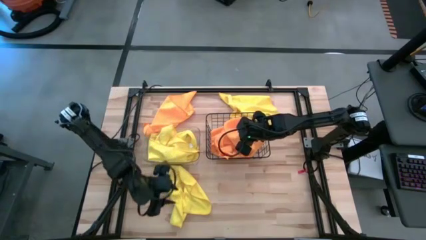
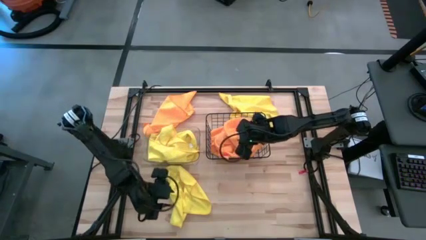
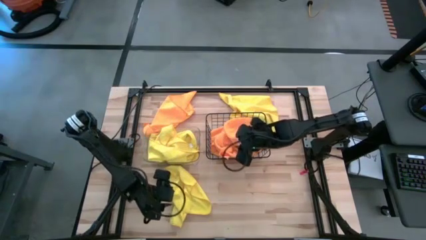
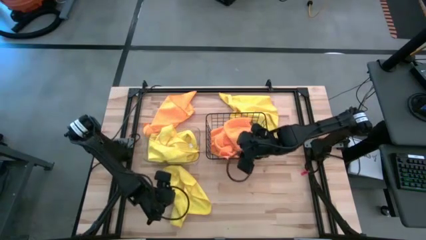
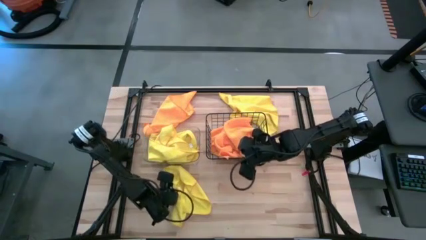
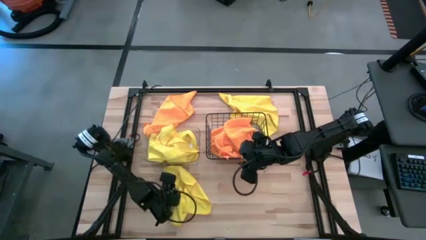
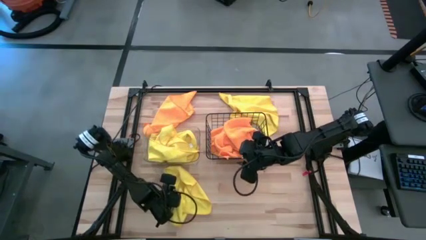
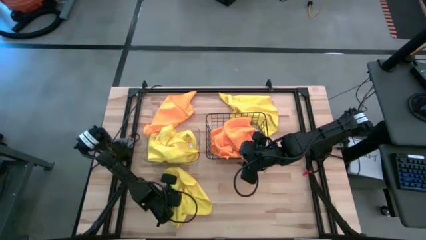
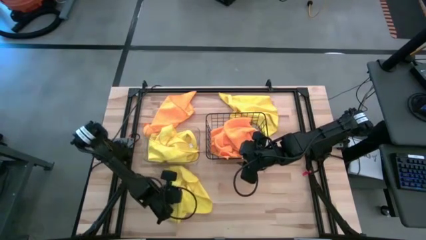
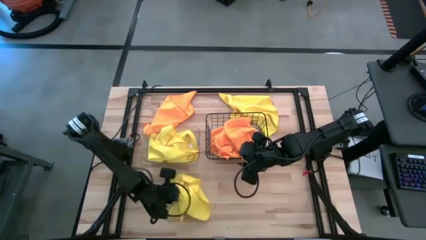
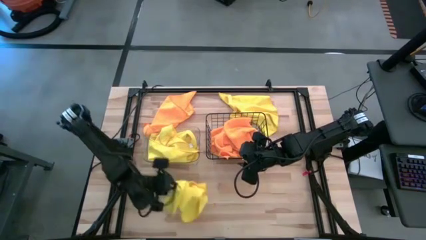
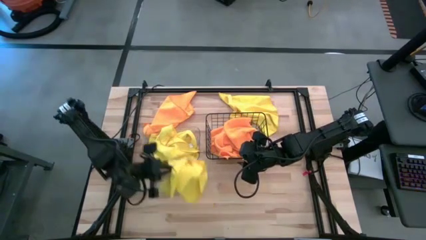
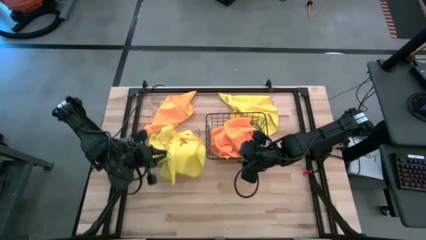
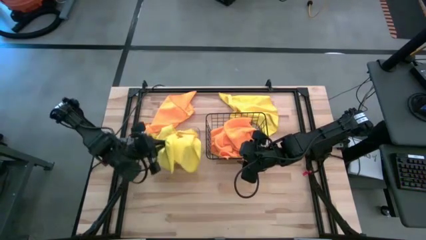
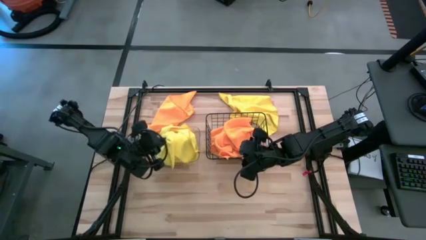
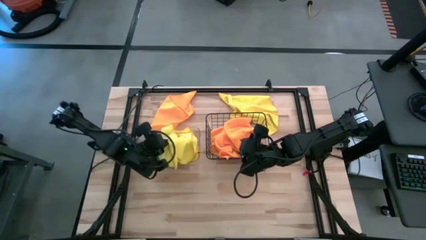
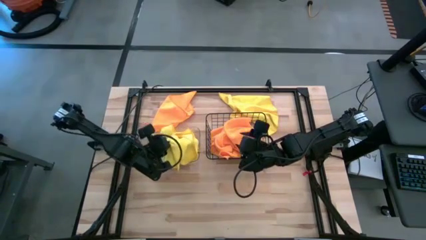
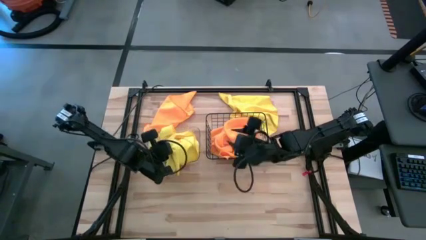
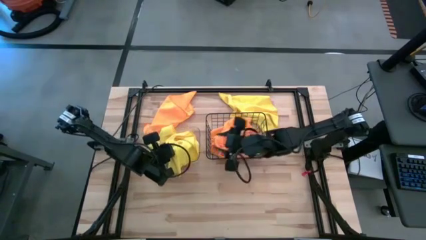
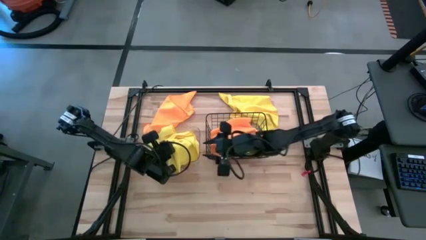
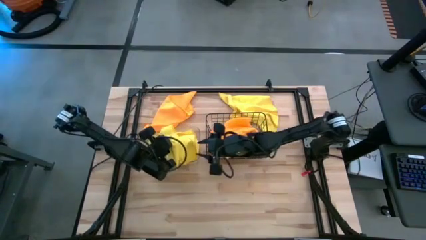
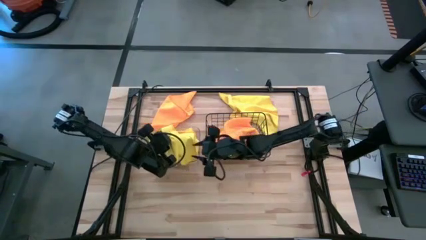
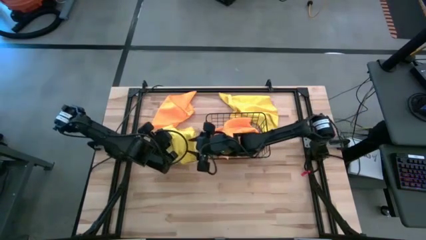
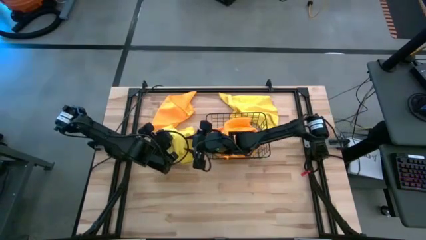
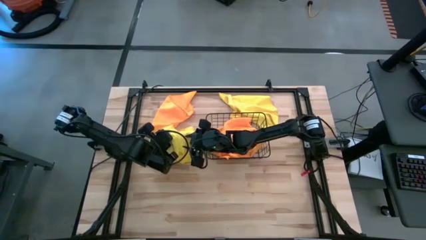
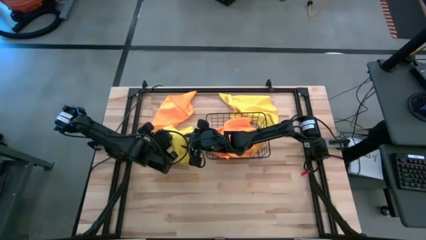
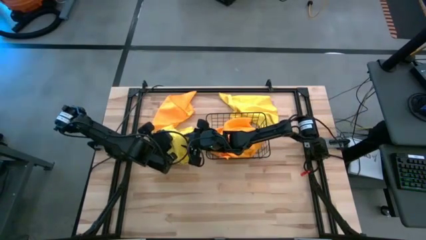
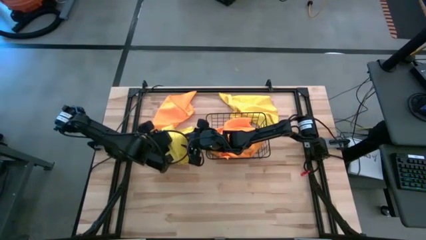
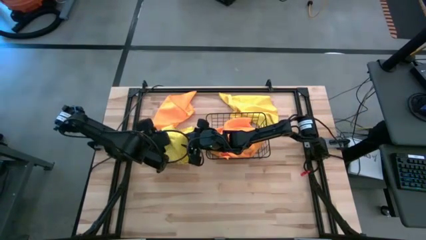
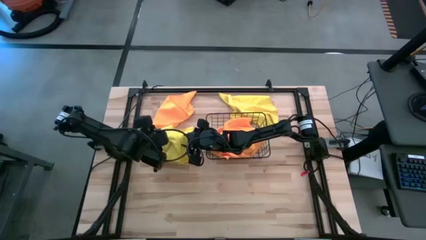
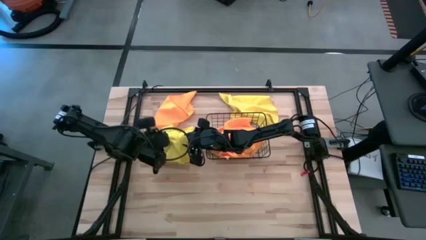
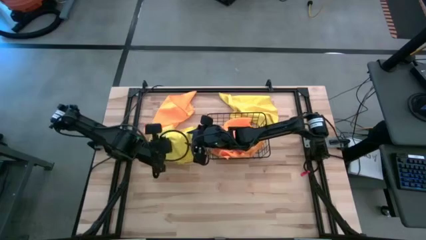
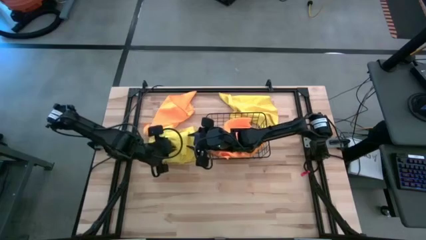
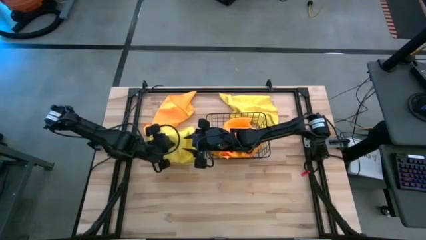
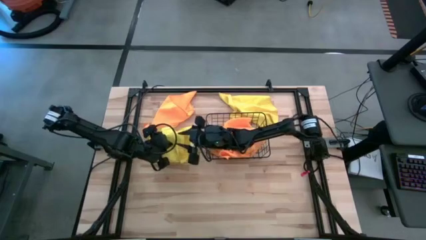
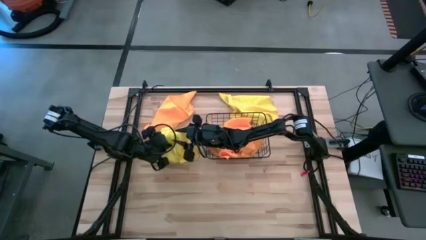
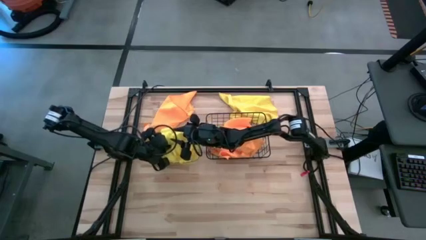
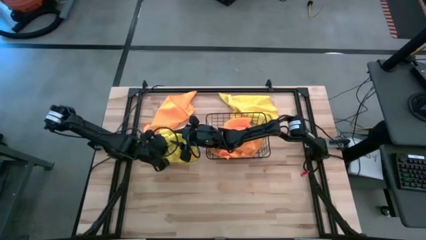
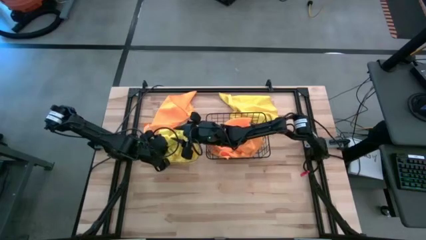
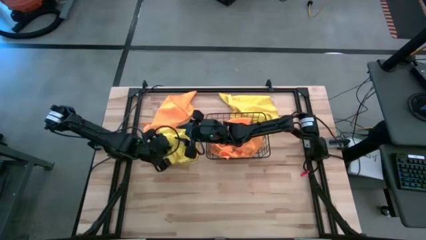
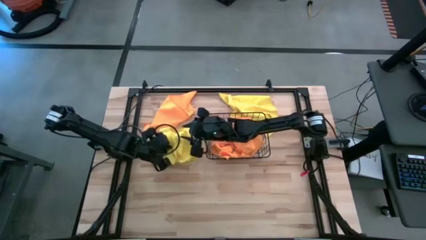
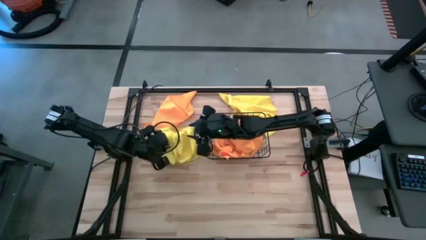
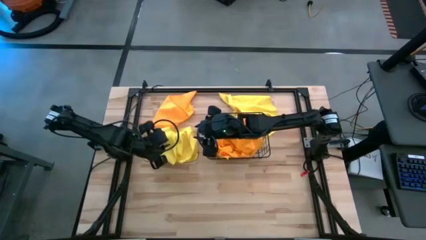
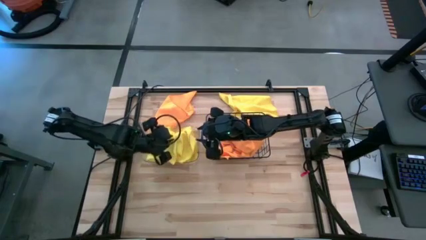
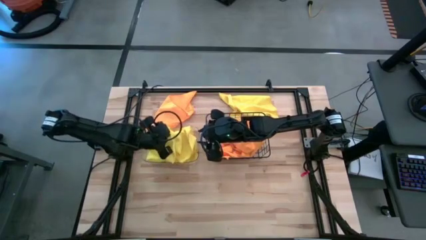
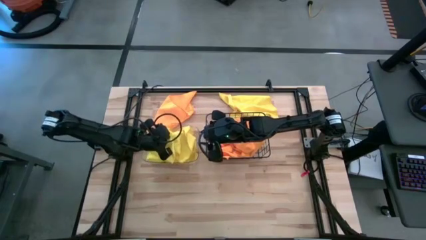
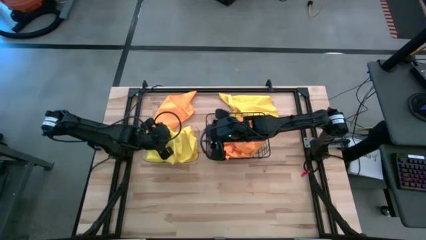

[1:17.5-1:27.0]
Task: Sort microfiber towel by color & place in baskets
Put the yellow towel into the transparent bin

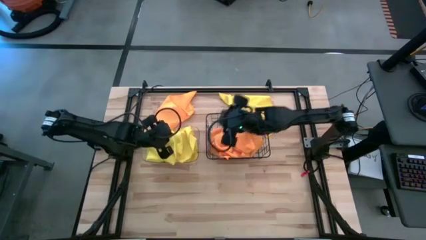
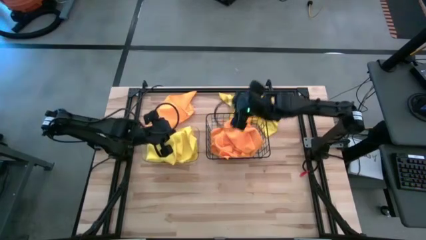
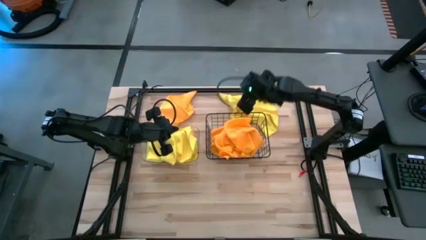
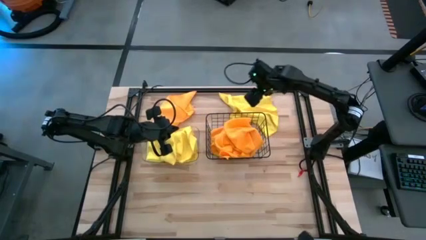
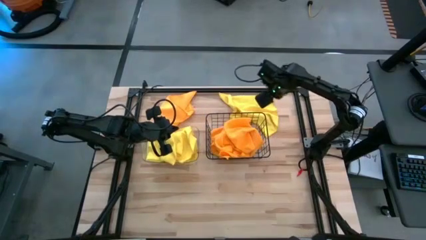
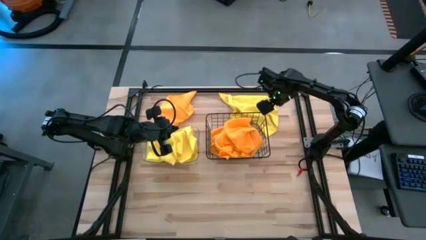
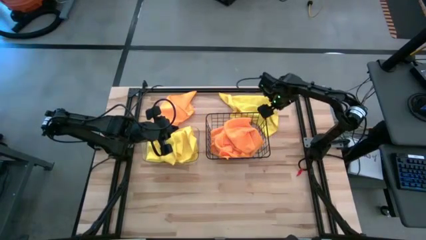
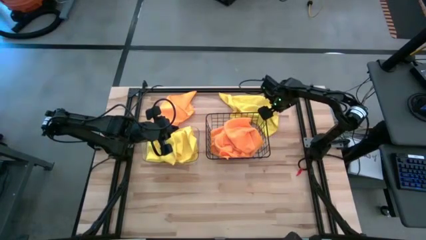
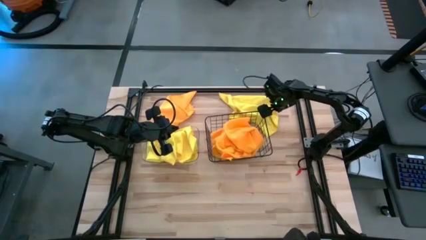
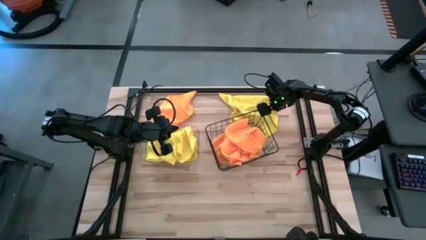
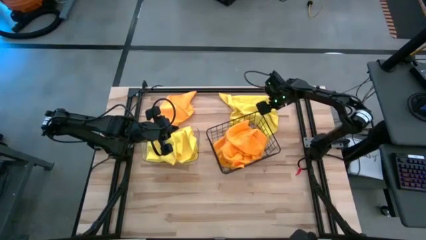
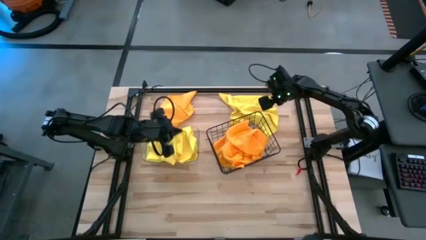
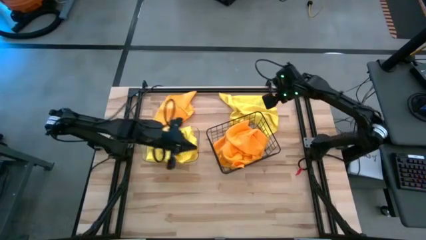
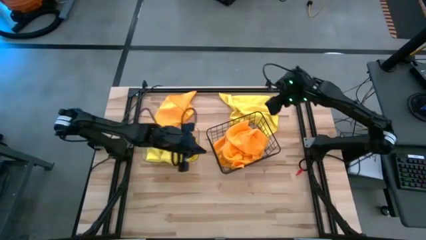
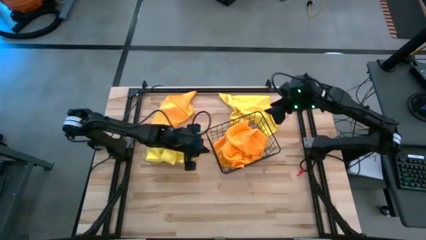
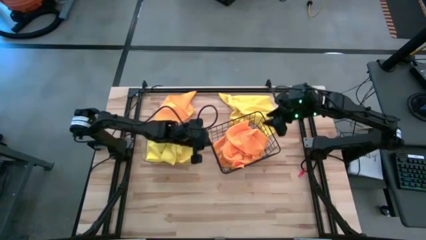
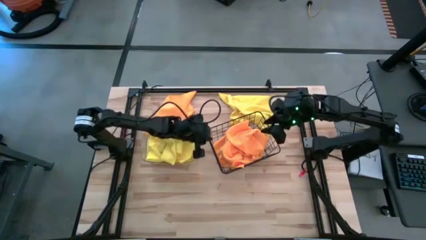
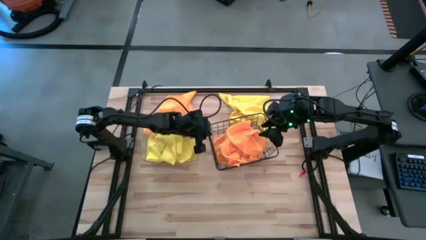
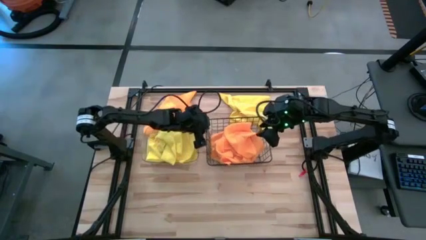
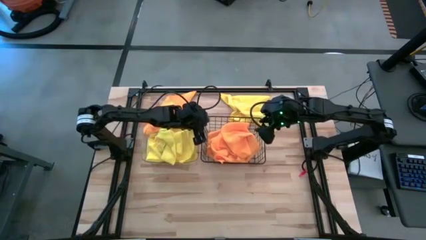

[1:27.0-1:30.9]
Adjust the black wire basket

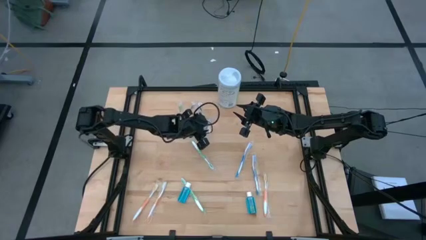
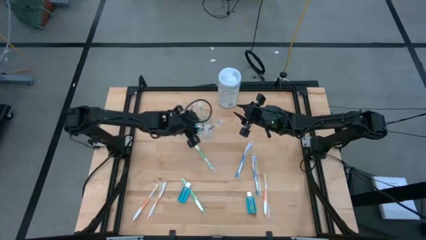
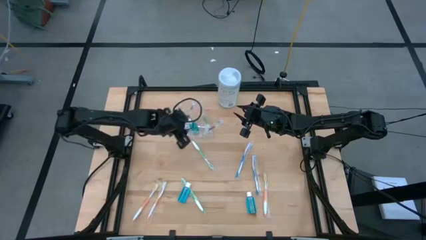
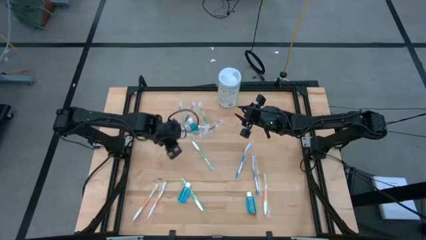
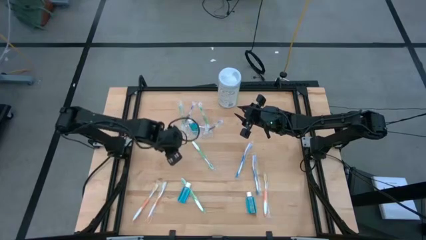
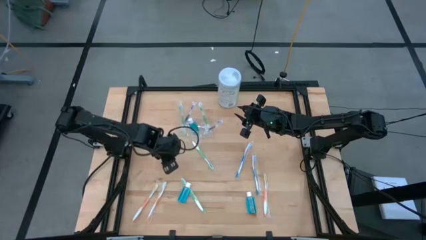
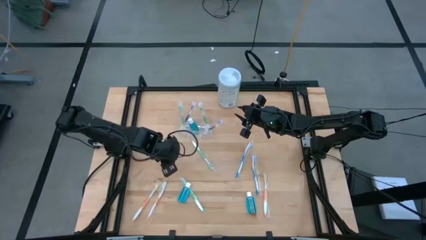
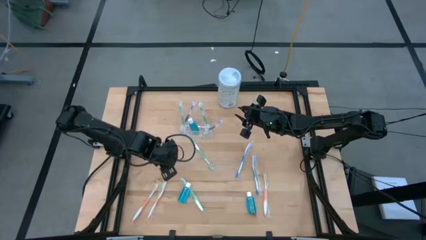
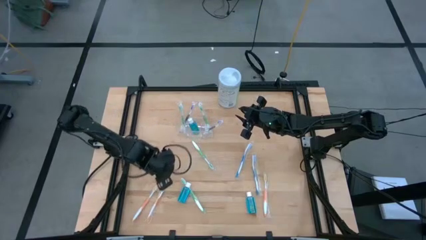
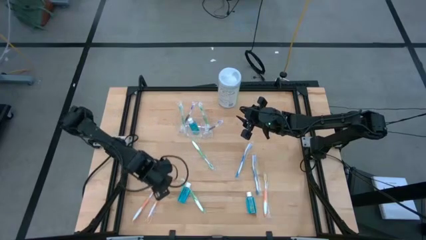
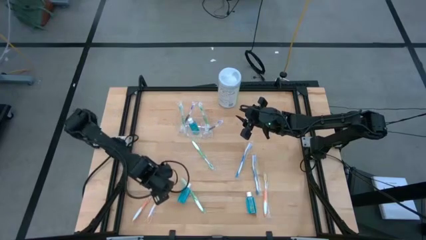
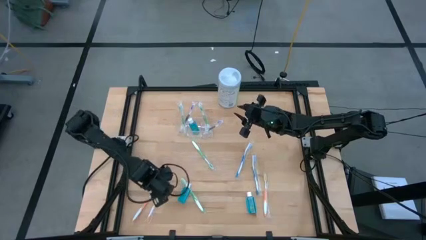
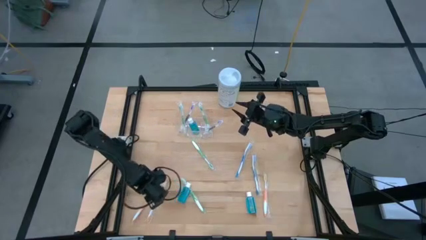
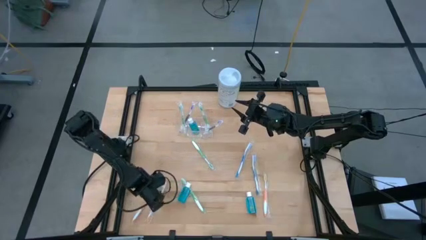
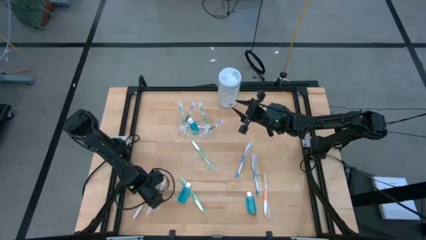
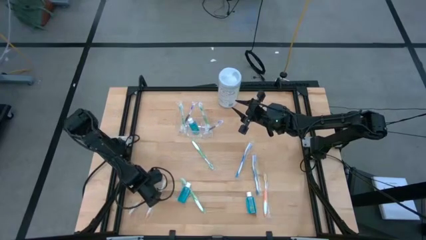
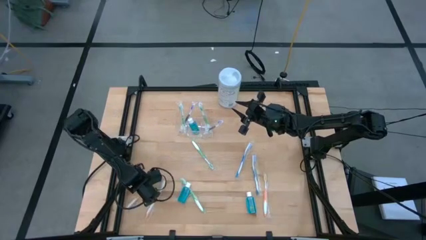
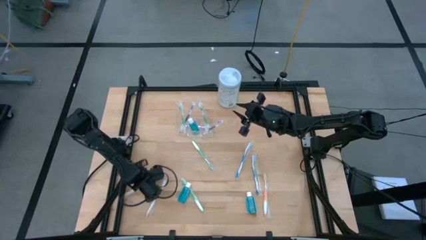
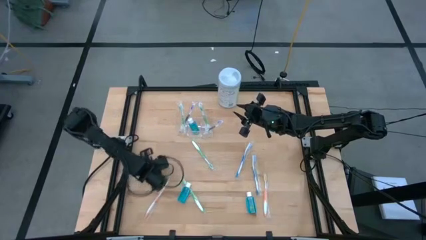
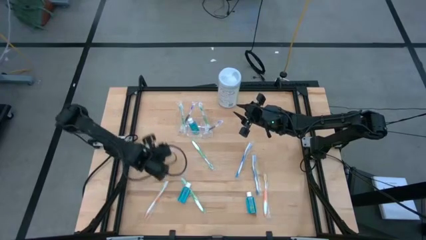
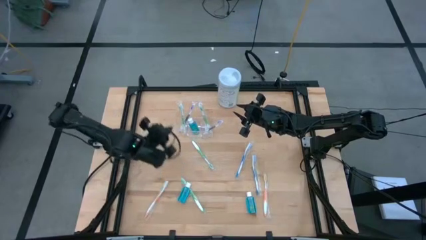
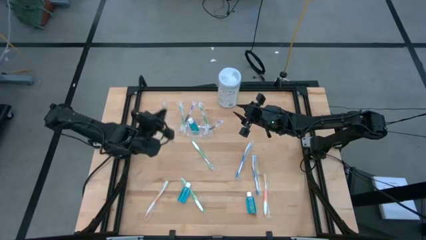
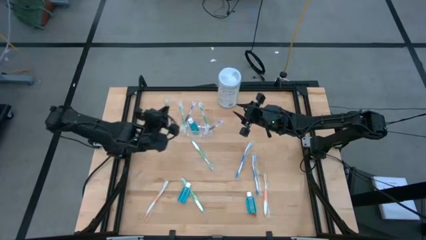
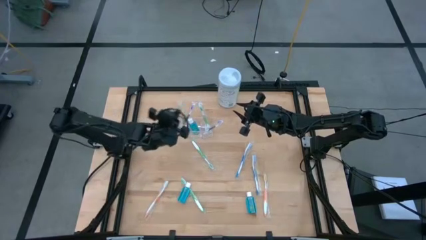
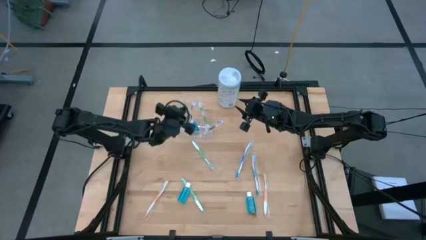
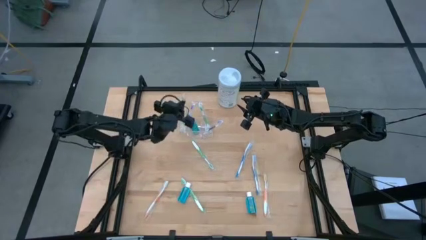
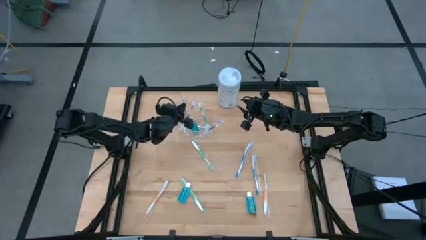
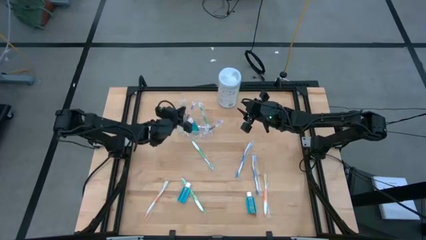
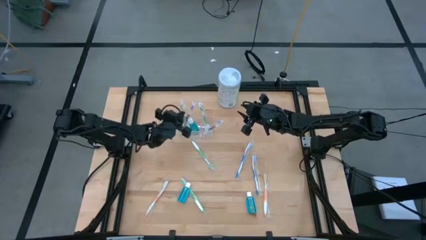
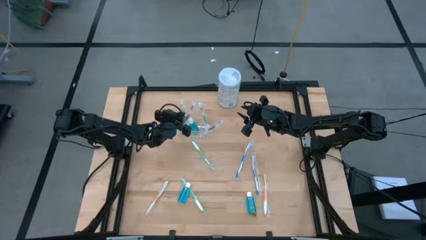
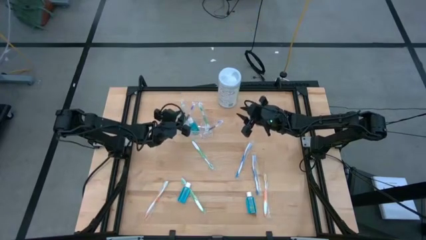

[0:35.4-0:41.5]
Task: Pick & Place toothbrushing station
Put the orange toothbrush into the transparent organizer
